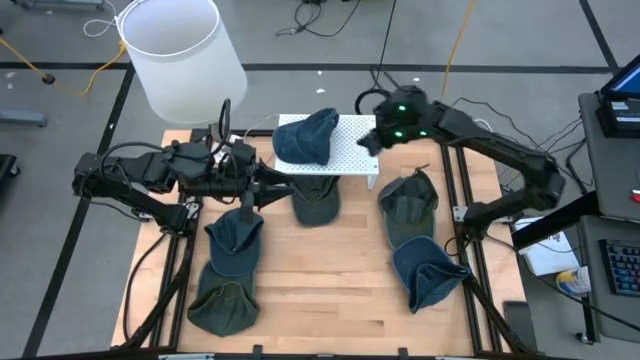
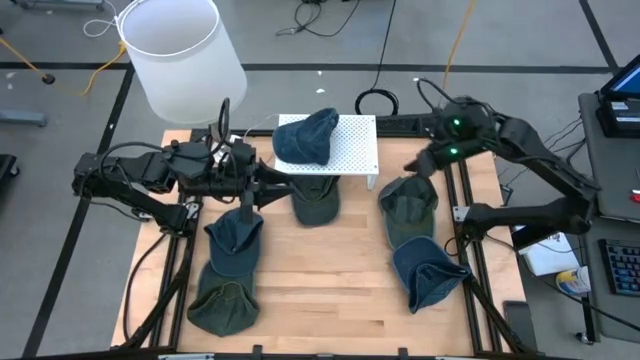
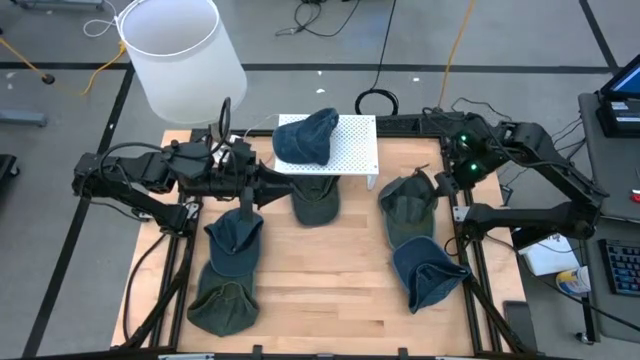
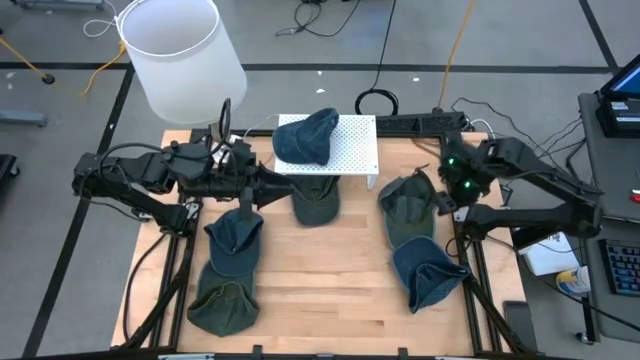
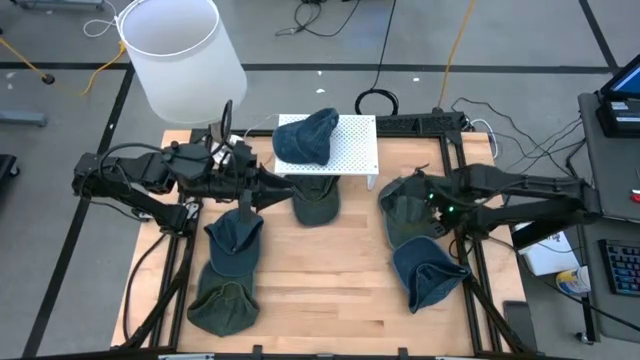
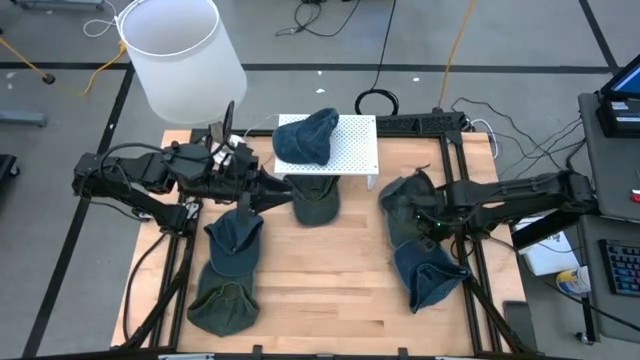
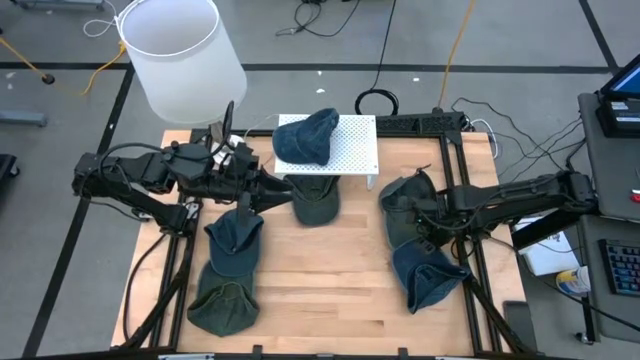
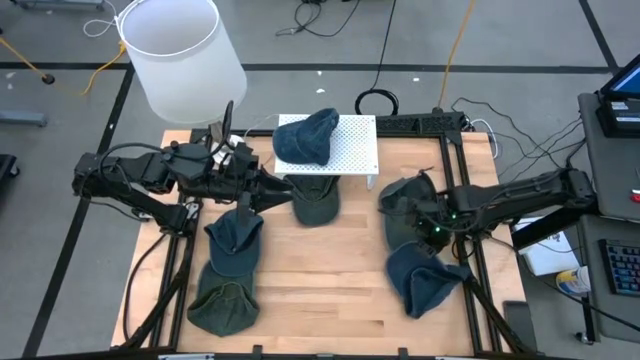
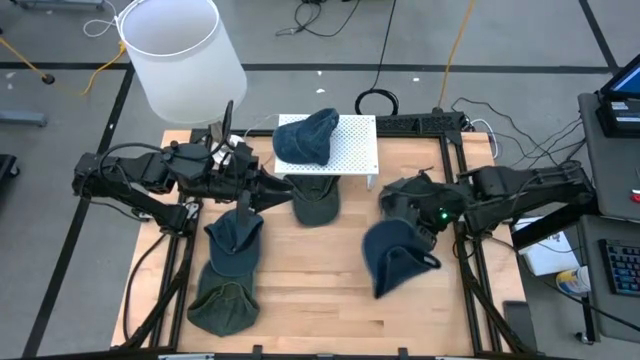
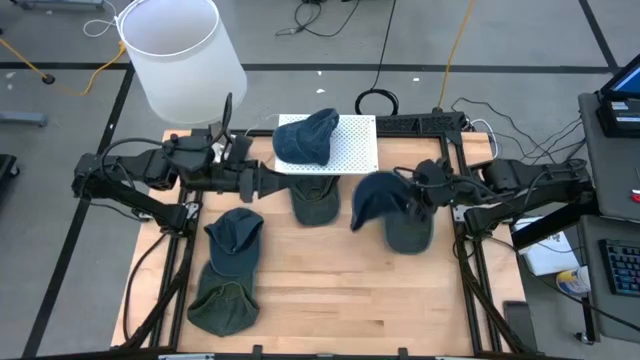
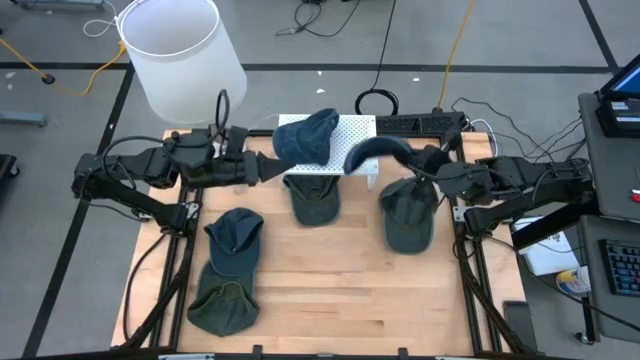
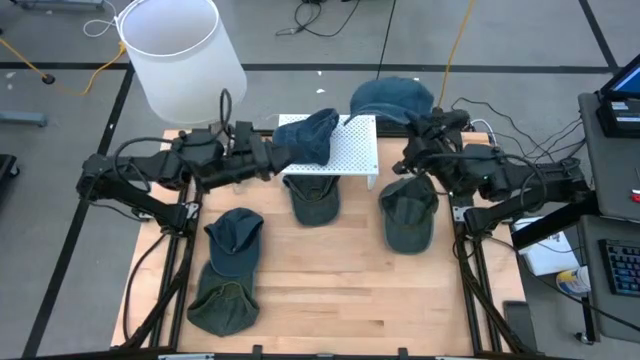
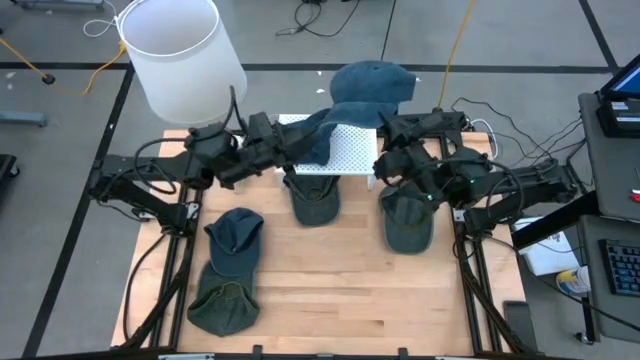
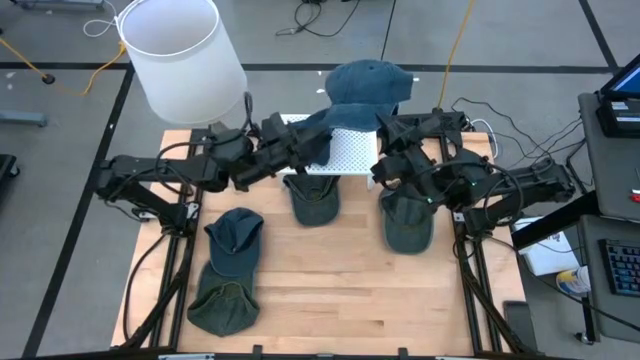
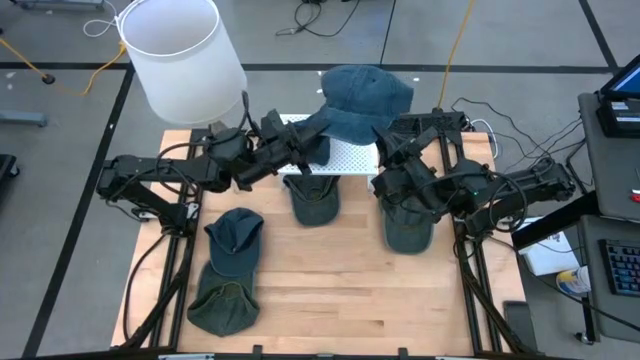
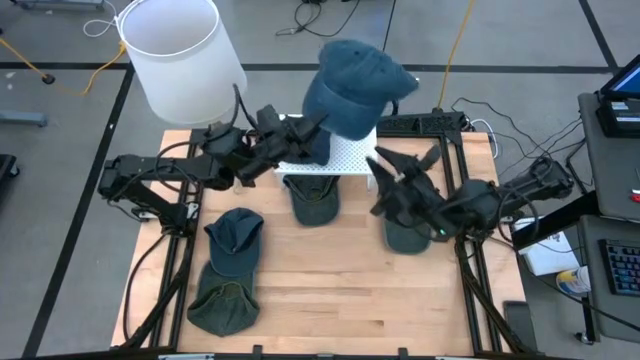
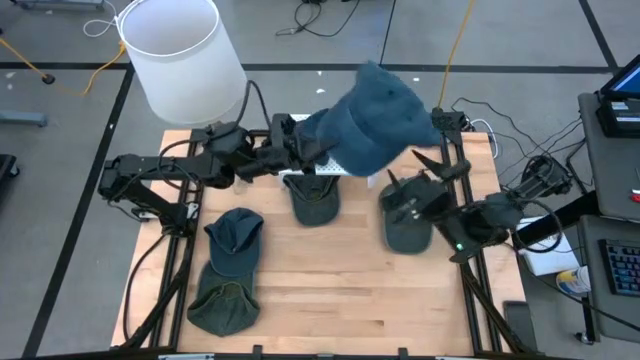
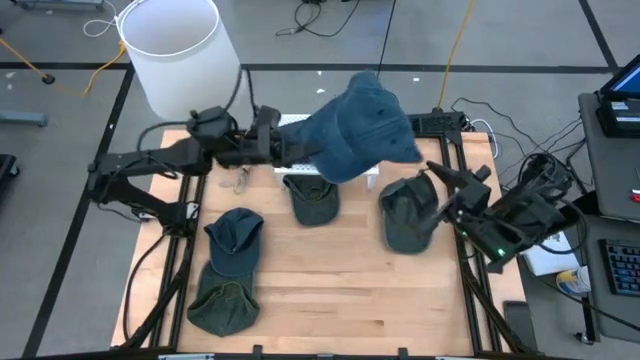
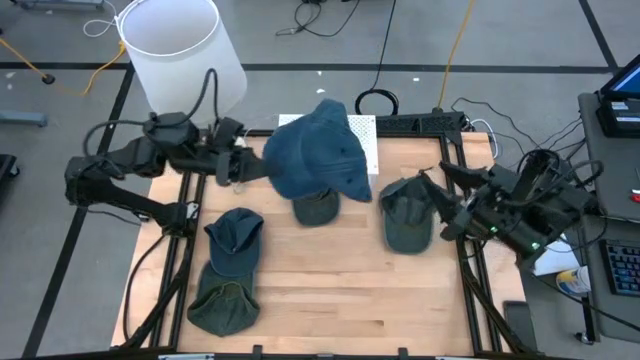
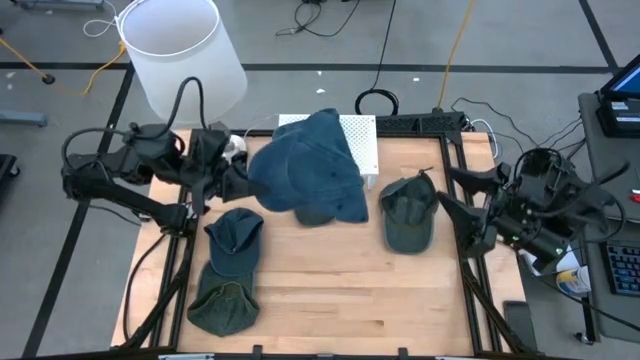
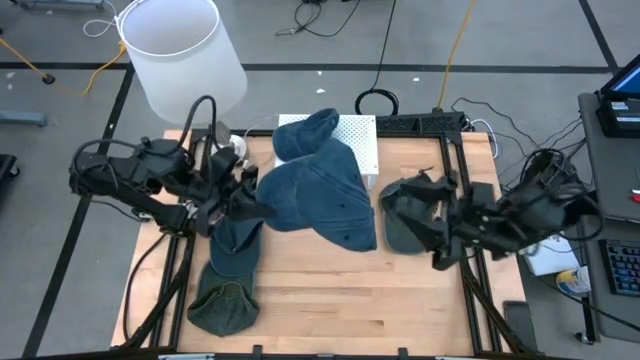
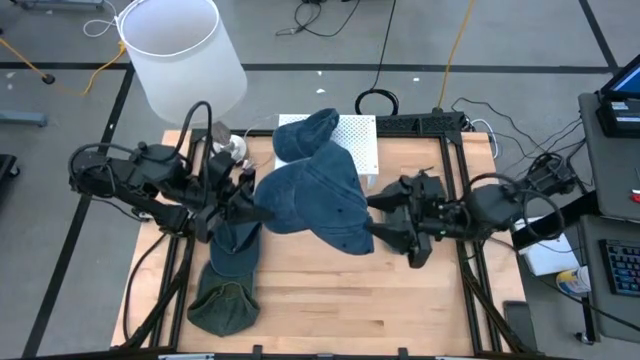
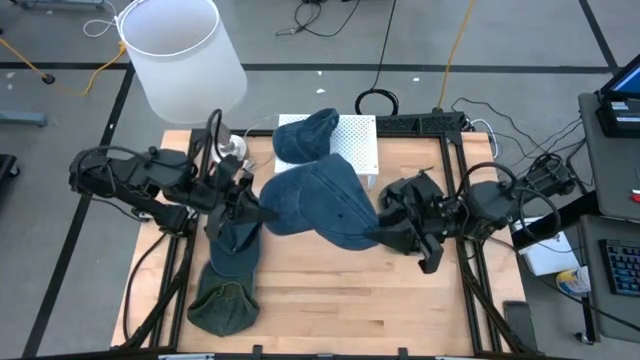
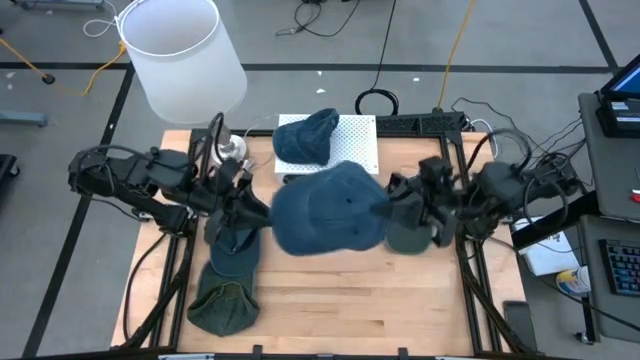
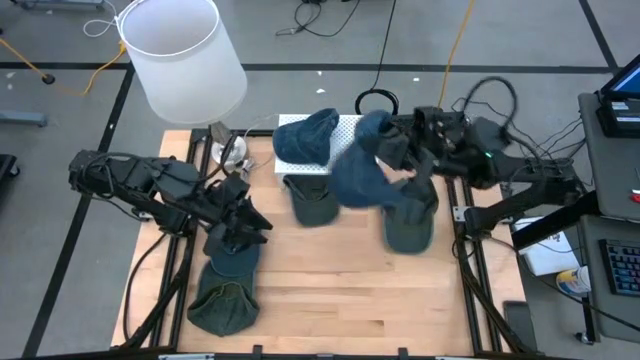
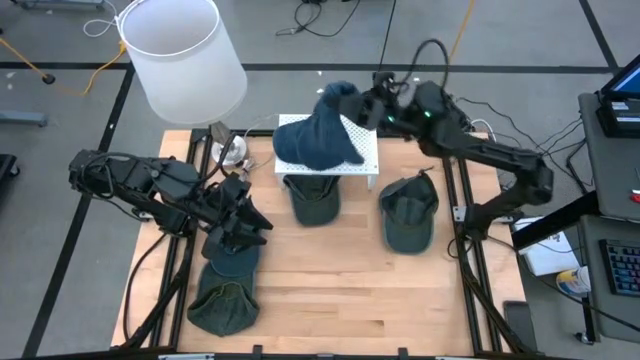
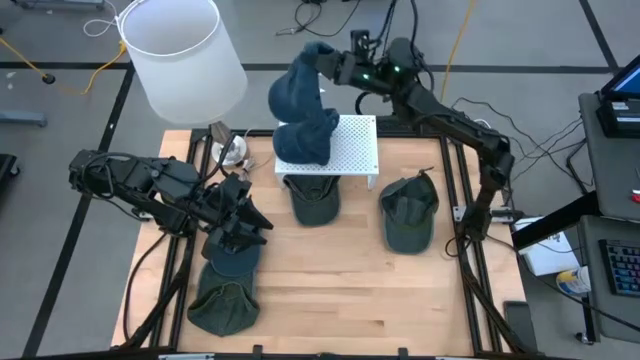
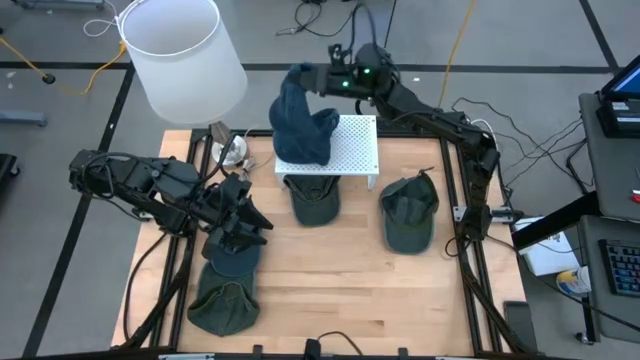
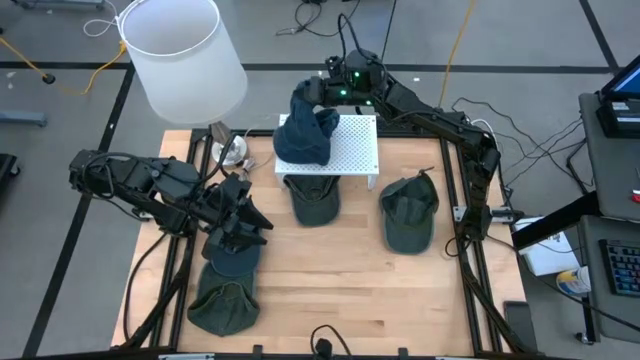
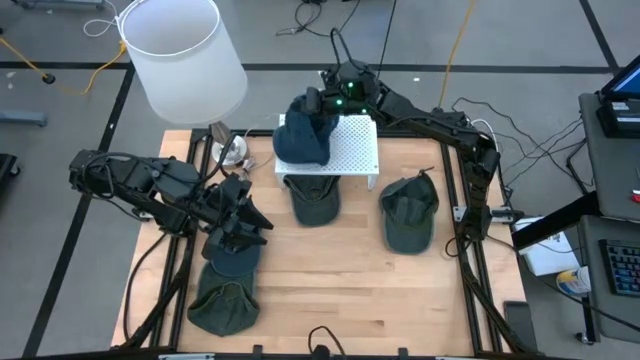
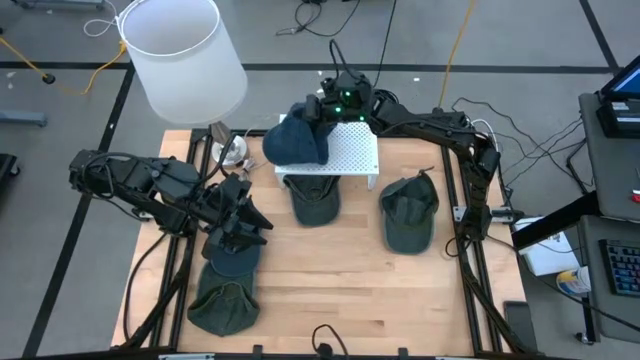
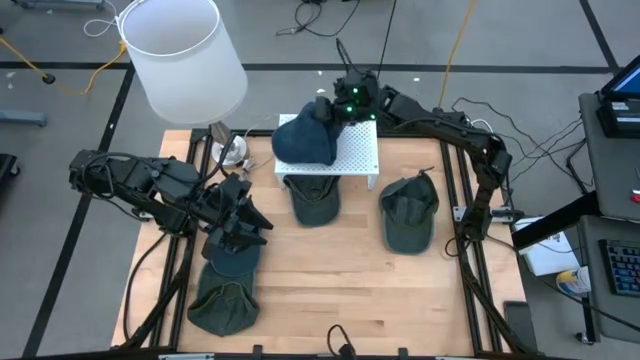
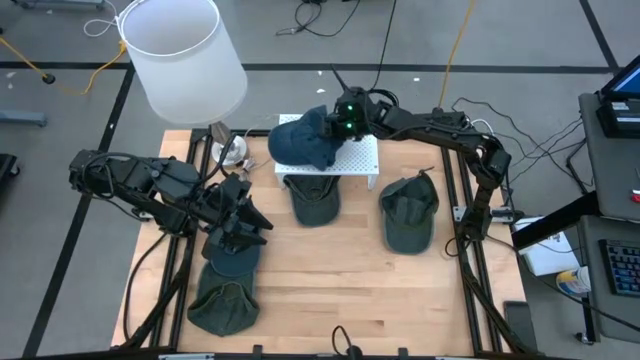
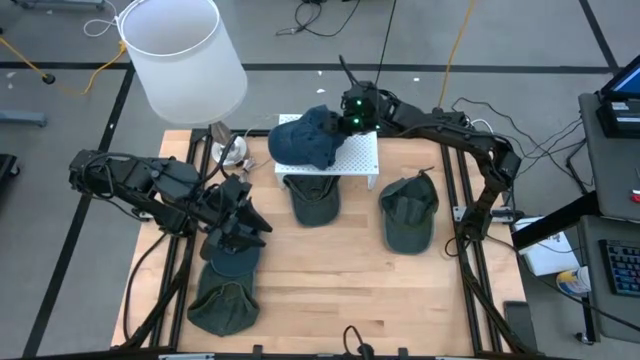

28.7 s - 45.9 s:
Task: Pick & Place hat
Stack the right blue cap on the blue cap on the shelf

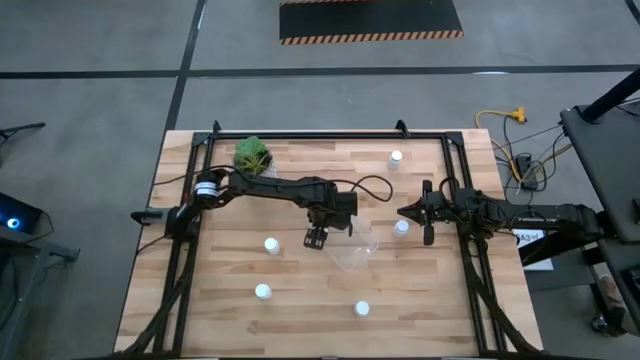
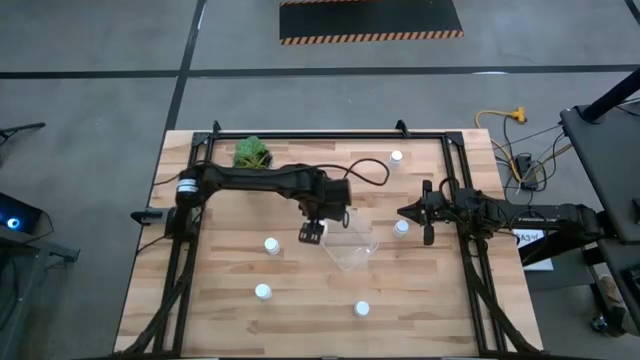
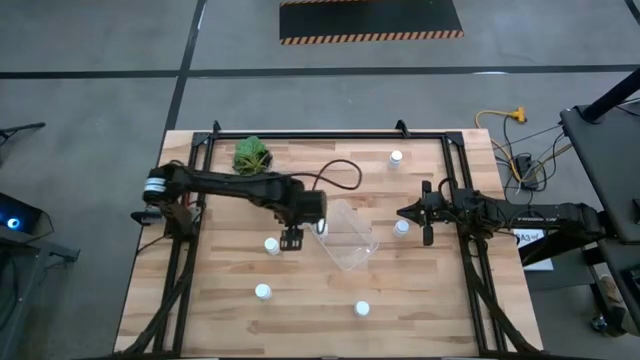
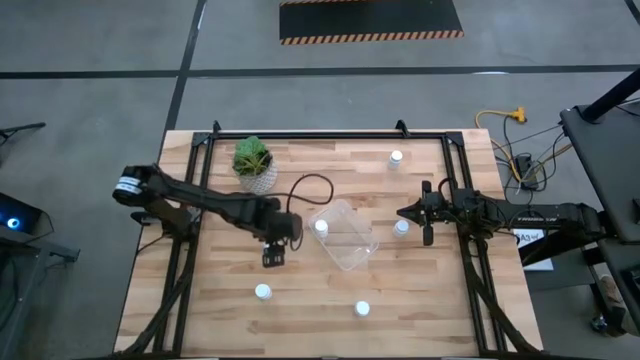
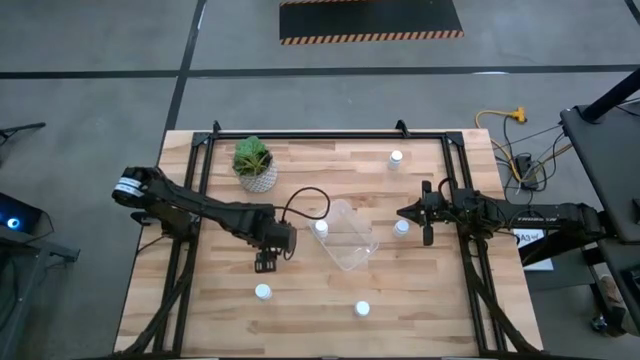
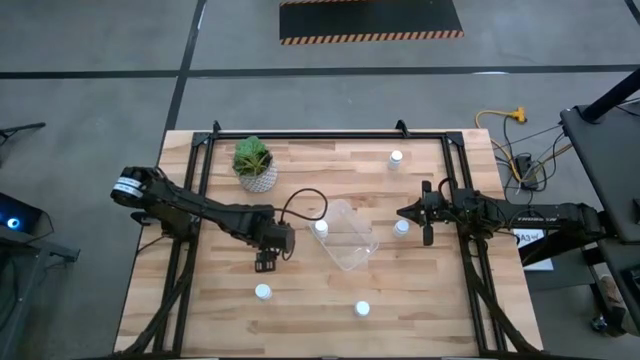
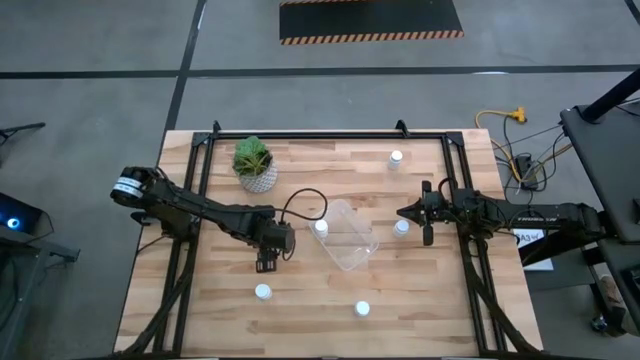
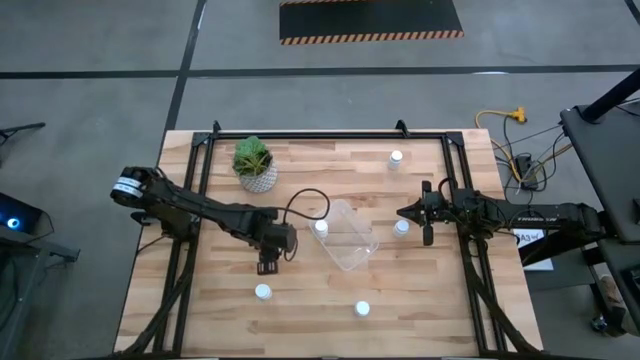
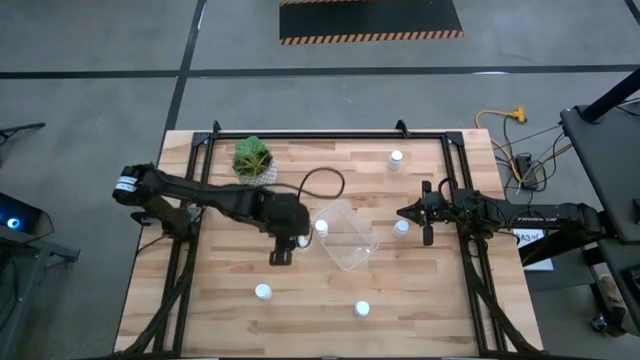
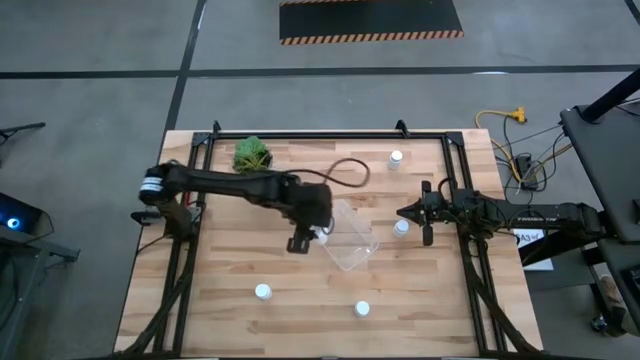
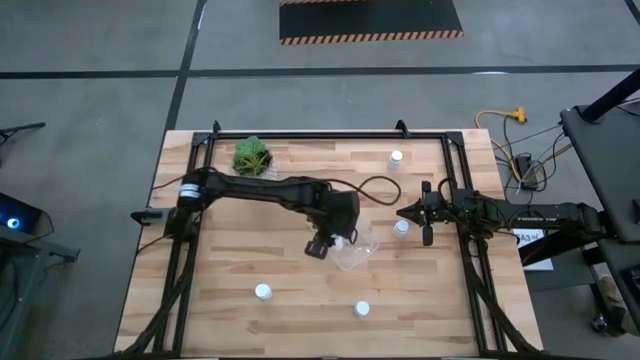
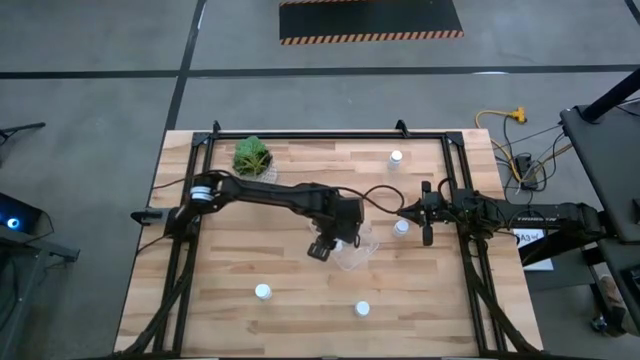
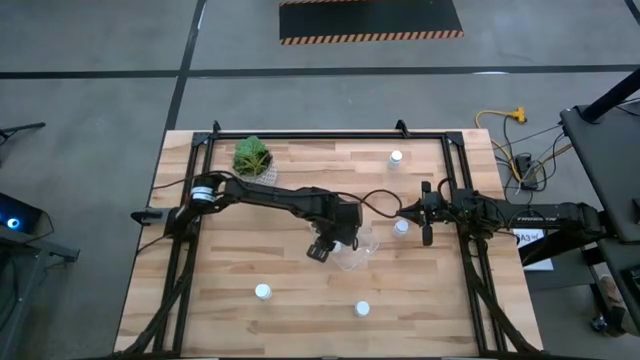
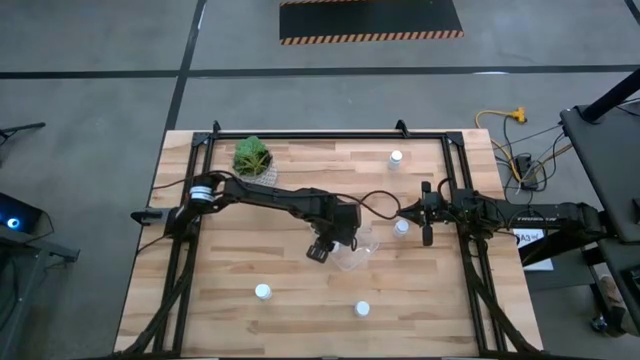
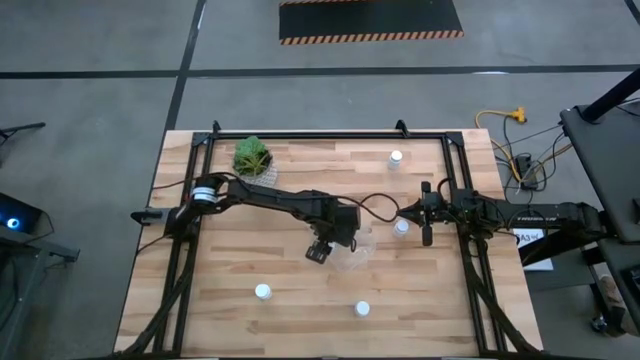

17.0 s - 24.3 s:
Task: Pick and place pill bottles into a basket
Put the white medicine bottle in the transparent bin
